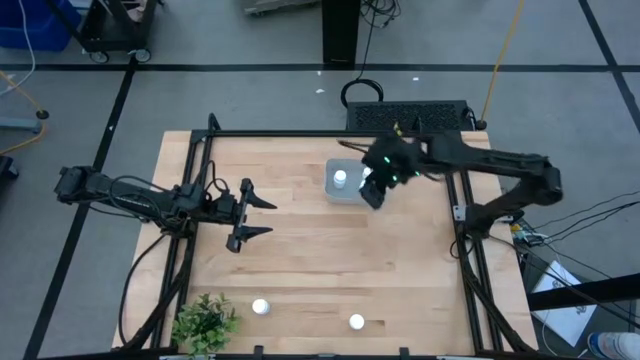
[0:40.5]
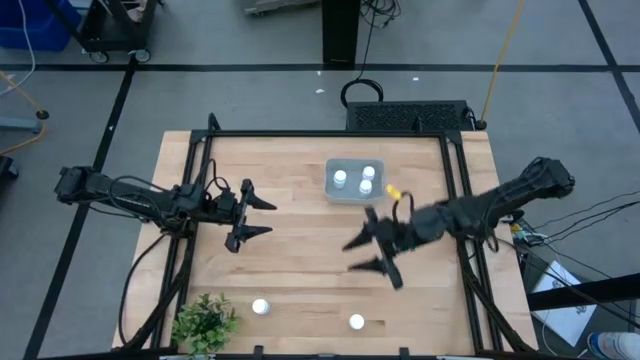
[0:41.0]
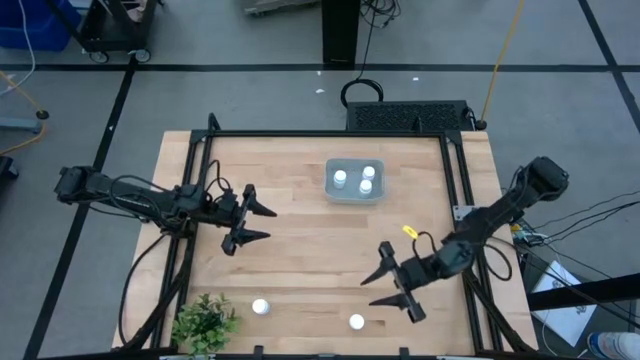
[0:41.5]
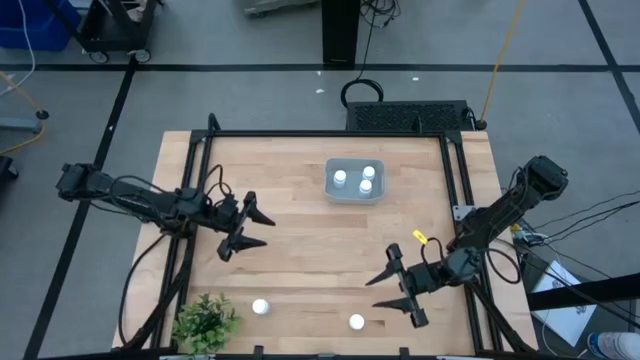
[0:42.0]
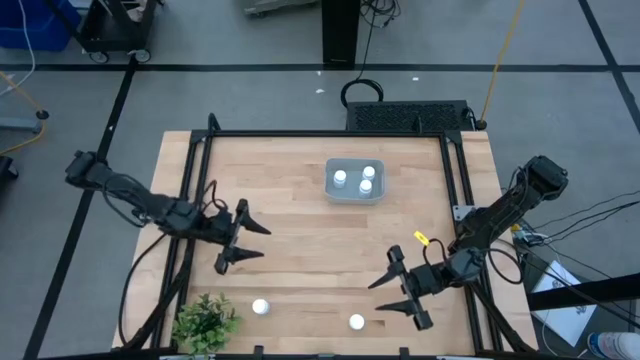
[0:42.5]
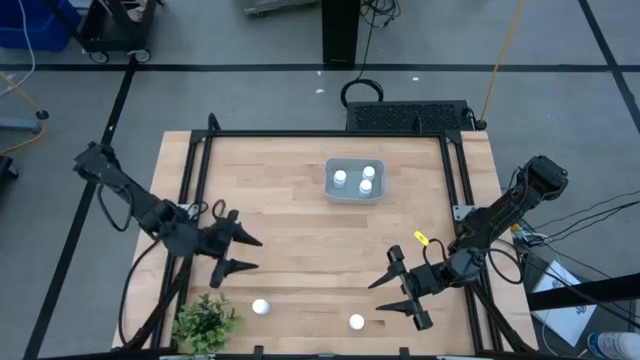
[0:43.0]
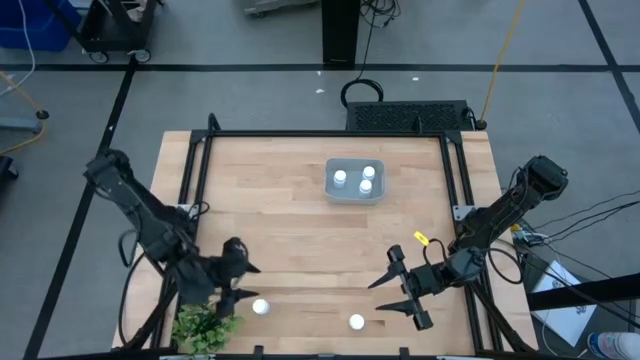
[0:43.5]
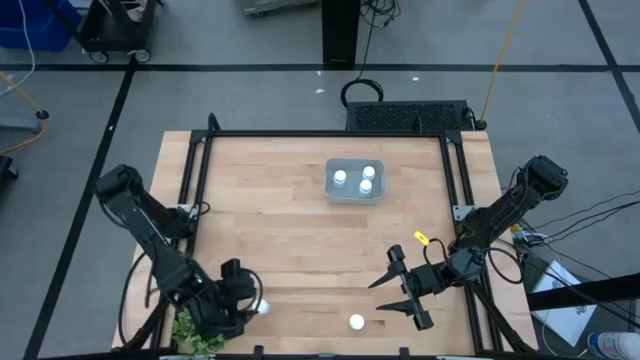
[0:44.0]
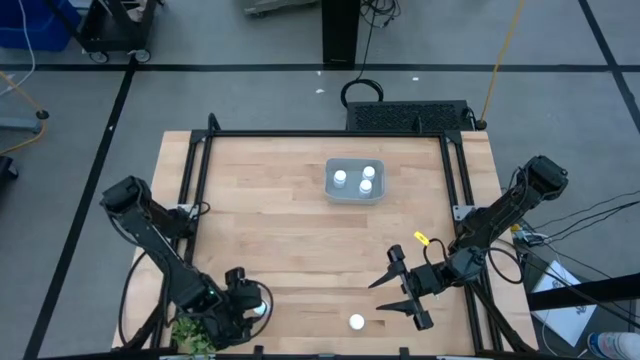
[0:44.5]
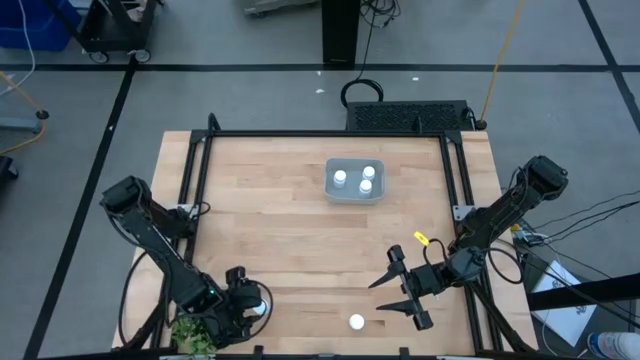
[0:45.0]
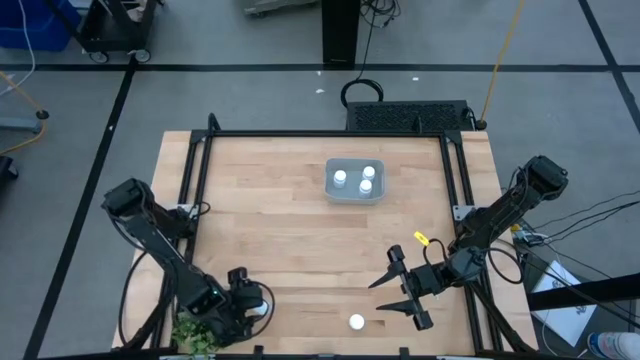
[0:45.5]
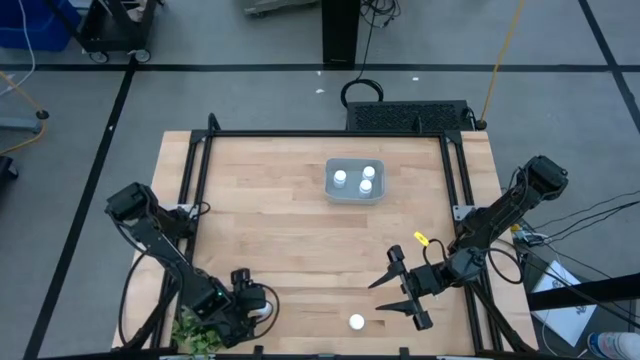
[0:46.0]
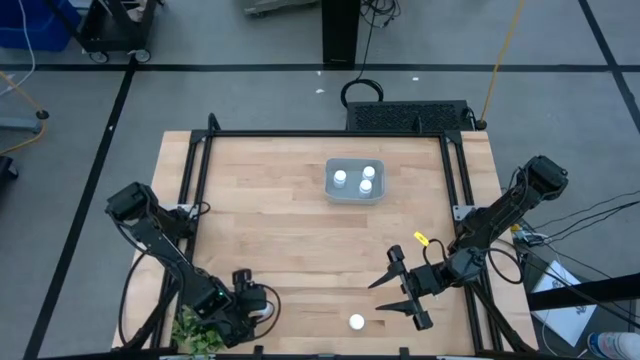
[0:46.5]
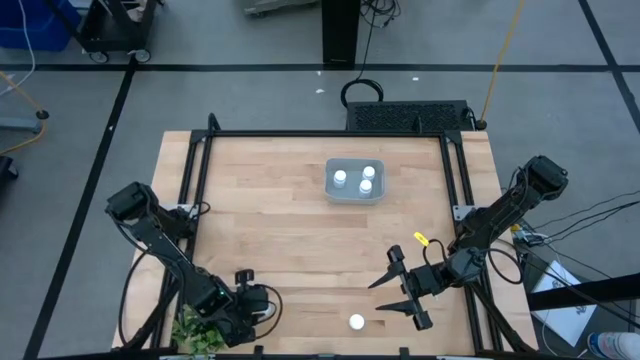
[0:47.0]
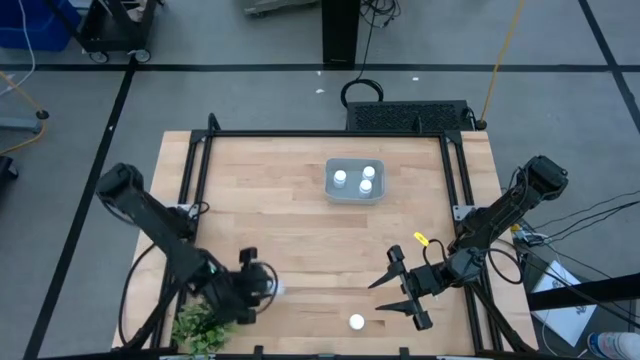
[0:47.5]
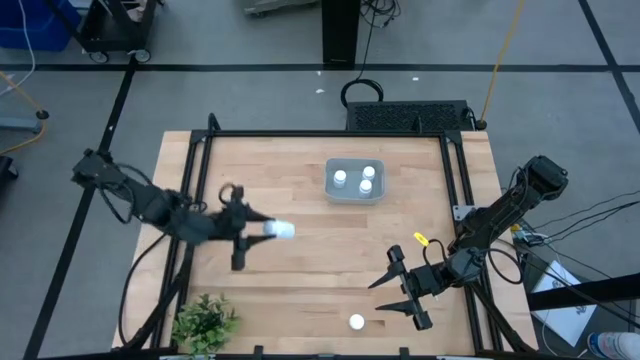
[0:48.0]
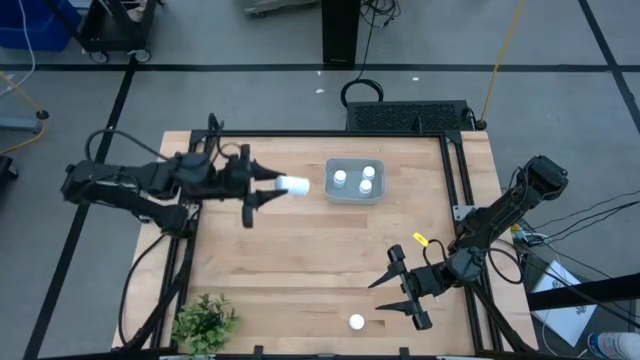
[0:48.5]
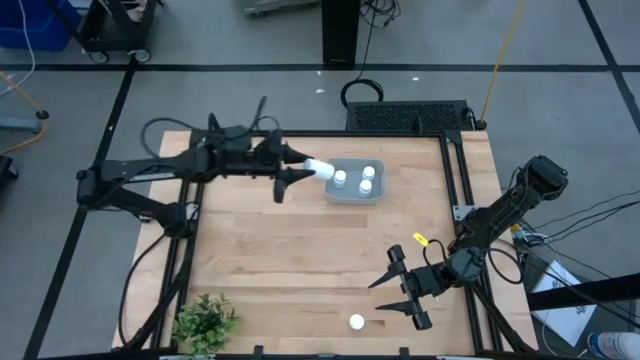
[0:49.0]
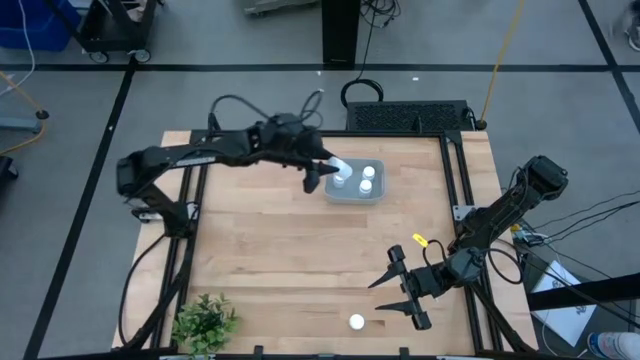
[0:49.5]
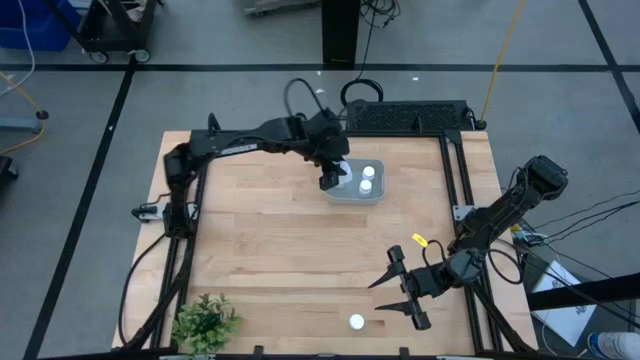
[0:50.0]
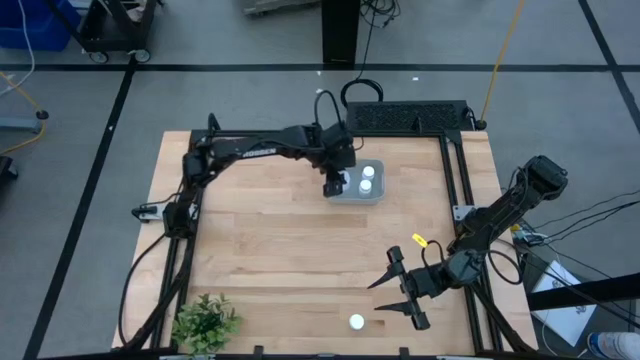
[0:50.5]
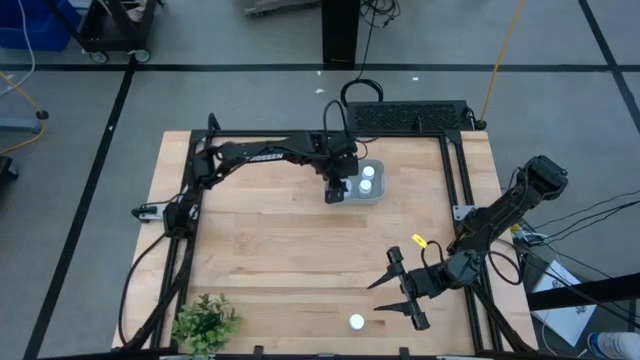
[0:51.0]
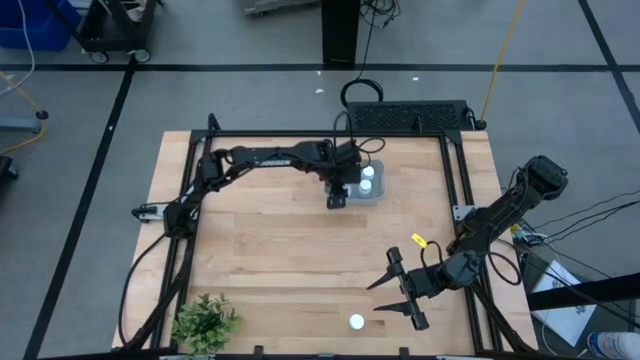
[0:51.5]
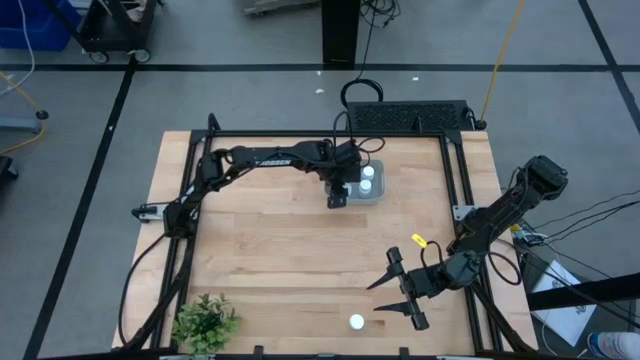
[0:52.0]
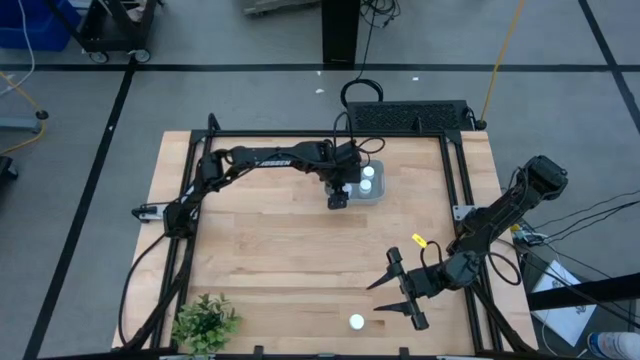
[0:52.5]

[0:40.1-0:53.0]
Task: Pick and place pill bottles into a basket
Put the white medicine bottle into the gray bin

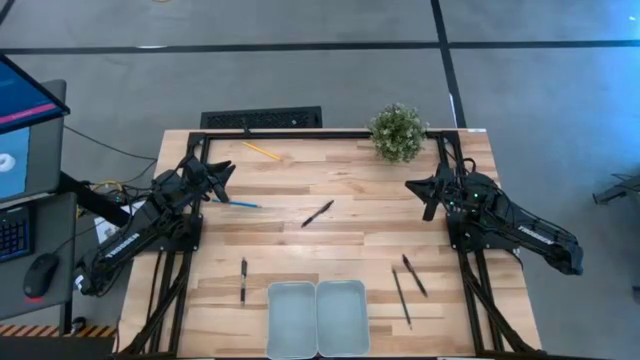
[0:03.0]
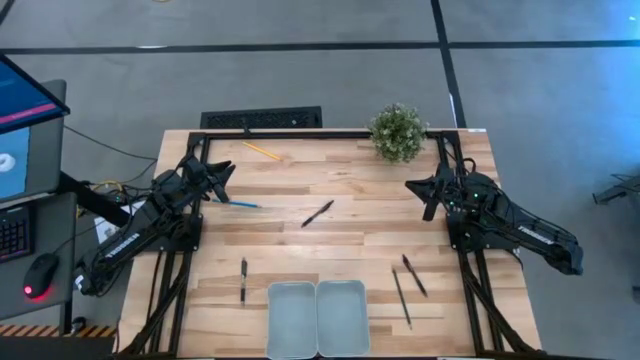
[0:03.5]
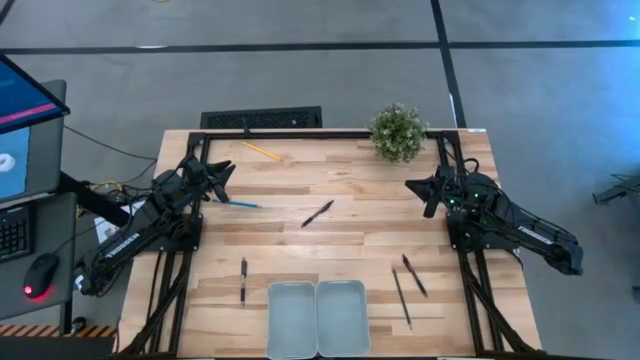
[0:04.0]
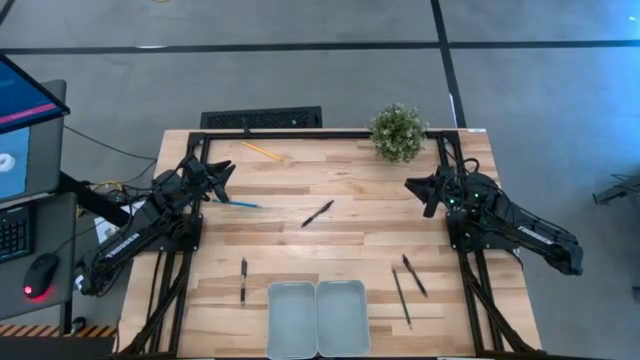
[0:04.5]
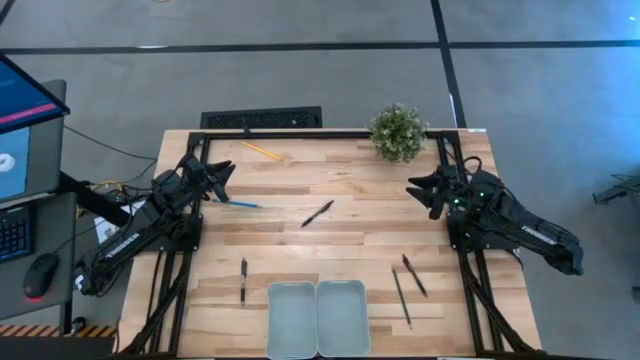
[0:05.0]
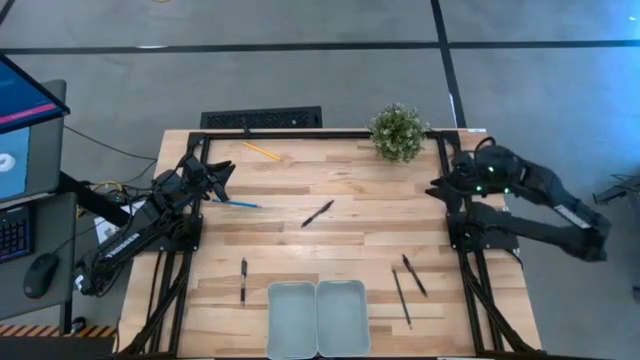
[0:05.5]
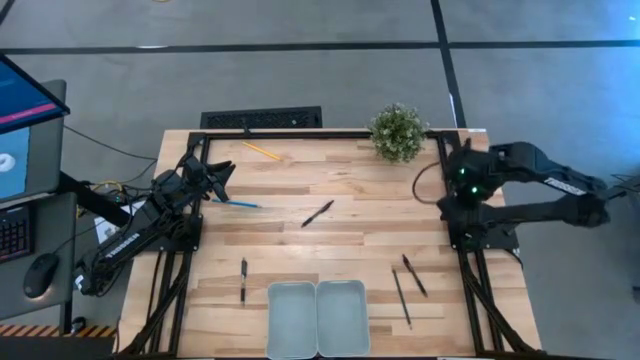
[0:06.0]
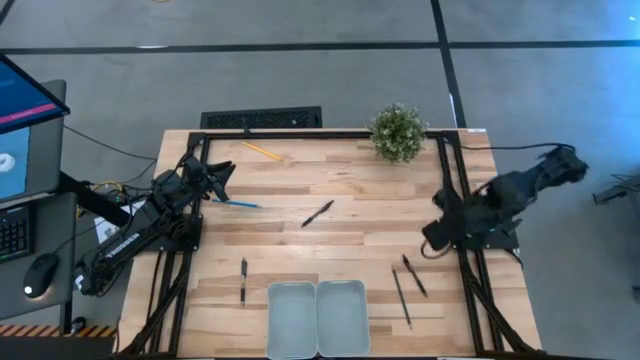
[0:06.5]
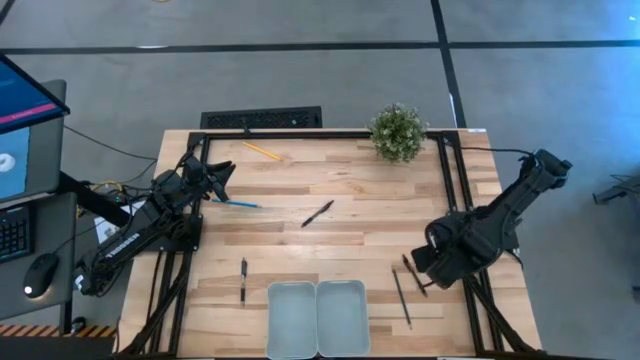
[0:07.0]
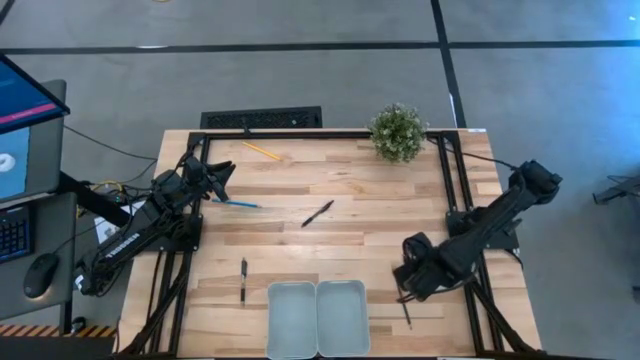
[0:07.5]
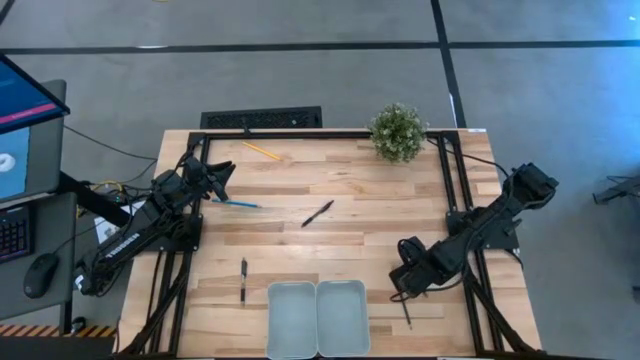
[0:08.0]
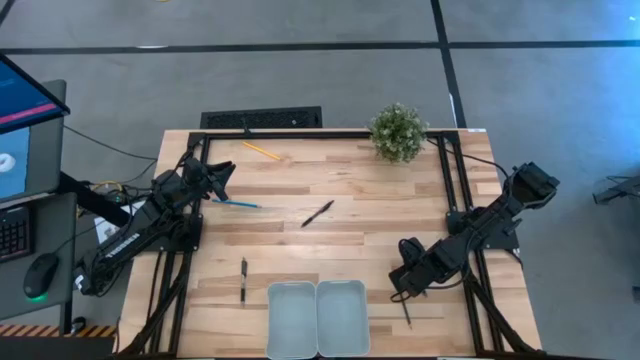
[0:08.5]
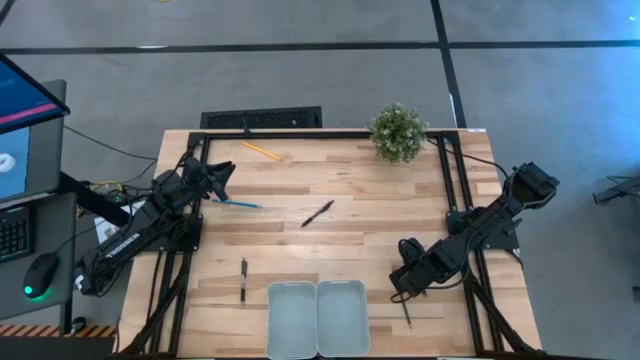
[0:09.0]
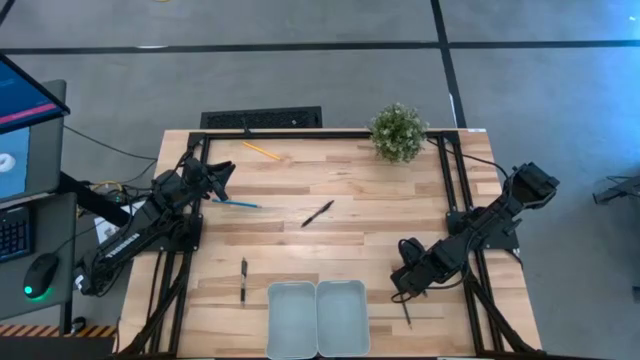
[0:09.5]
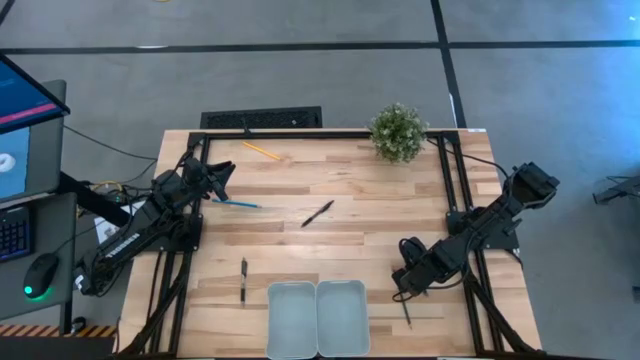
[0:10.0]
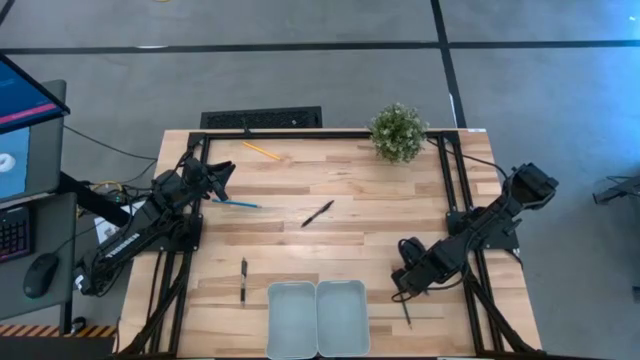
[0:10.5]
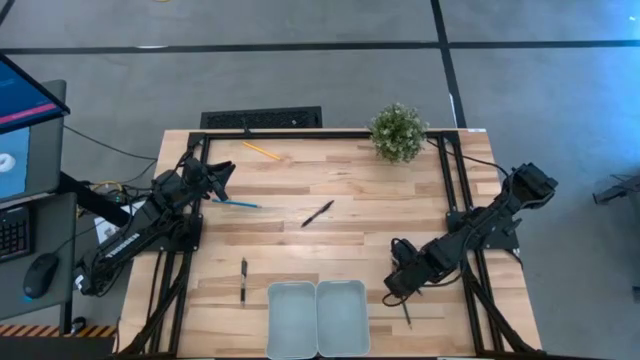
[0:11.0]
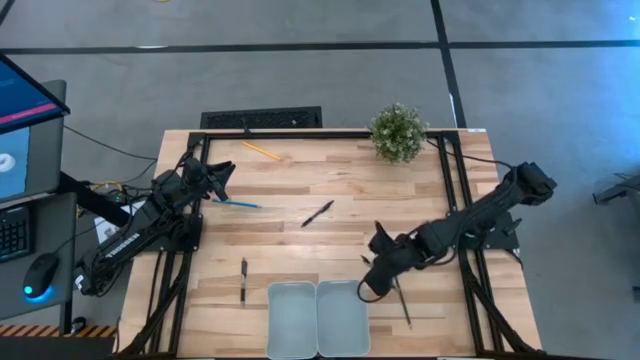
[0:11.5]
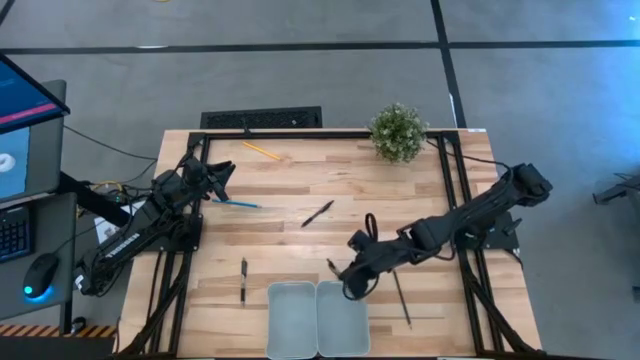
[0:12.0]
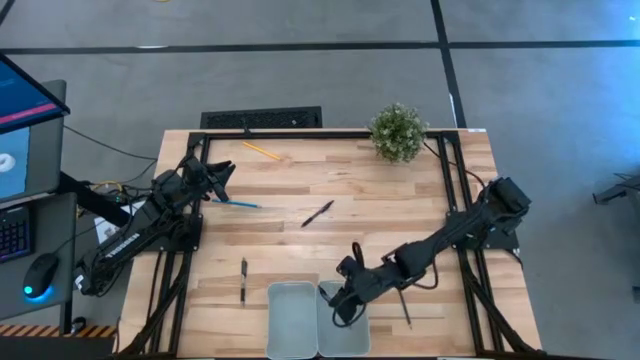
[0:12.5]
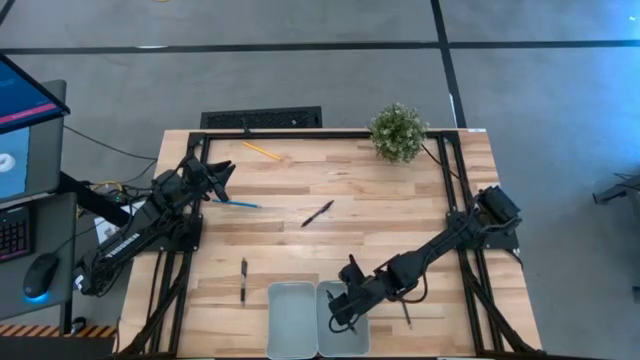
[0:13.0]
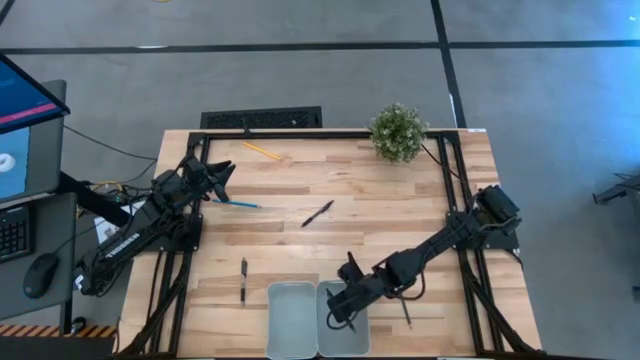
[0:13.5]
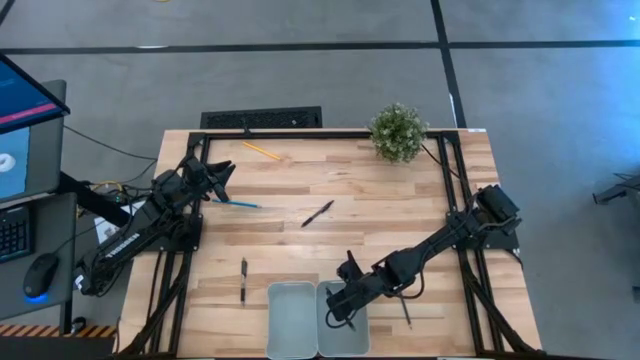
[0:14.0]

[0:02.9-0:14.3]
Task: Sort pens & pencils
Put the right black pen into the right gray bin
